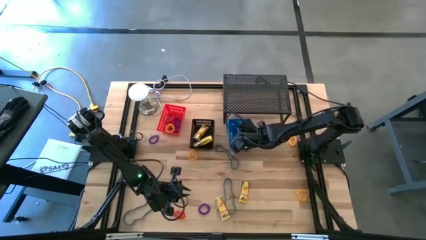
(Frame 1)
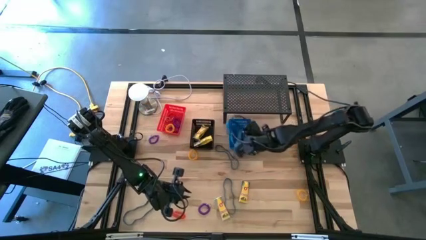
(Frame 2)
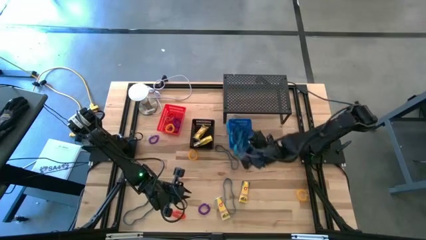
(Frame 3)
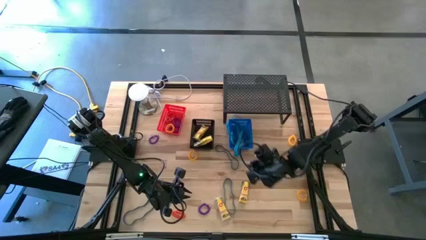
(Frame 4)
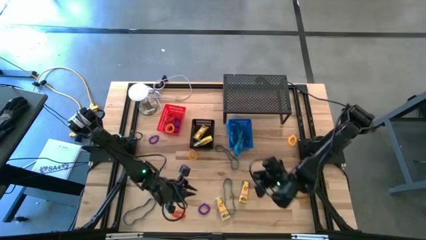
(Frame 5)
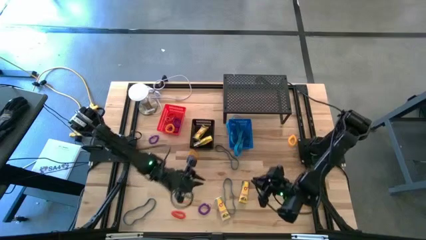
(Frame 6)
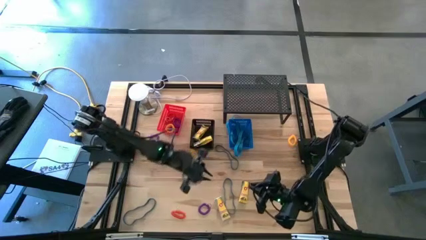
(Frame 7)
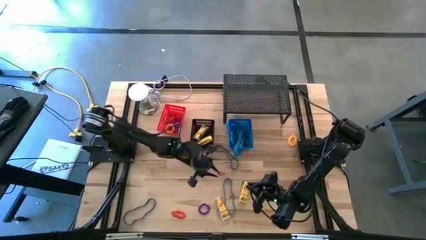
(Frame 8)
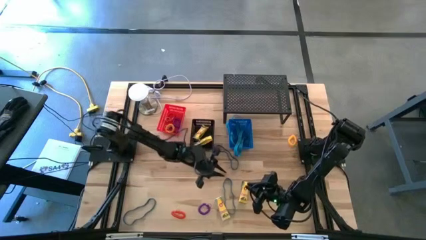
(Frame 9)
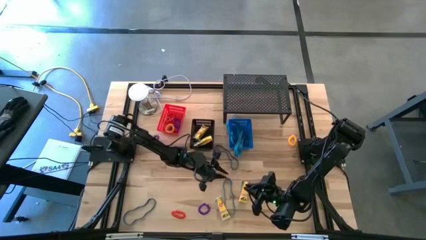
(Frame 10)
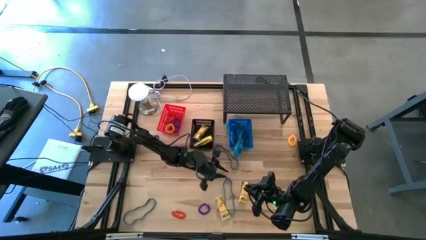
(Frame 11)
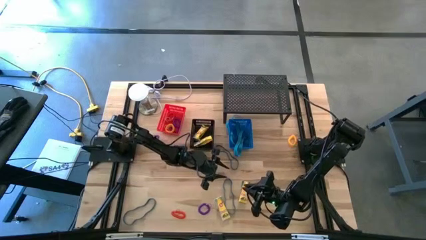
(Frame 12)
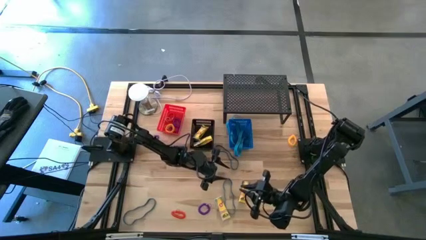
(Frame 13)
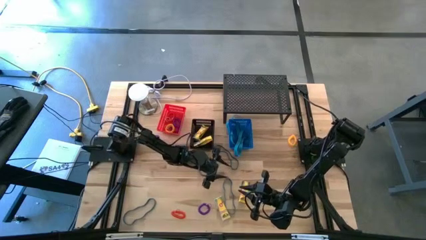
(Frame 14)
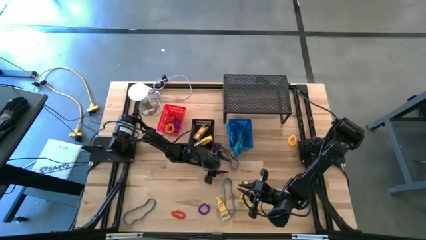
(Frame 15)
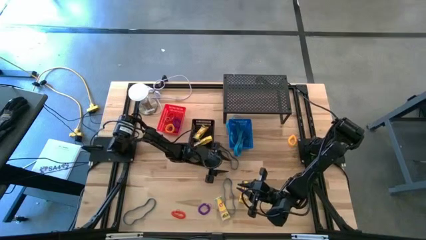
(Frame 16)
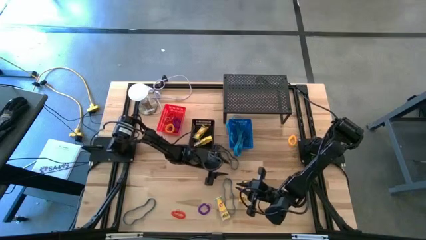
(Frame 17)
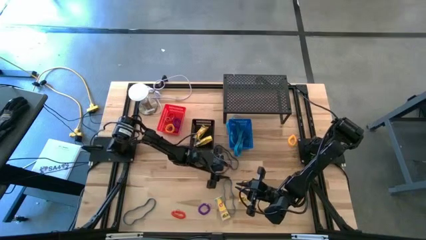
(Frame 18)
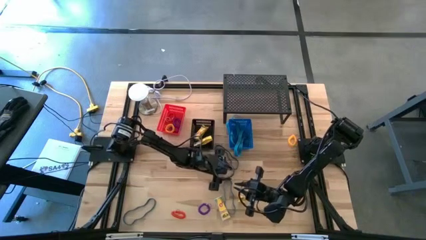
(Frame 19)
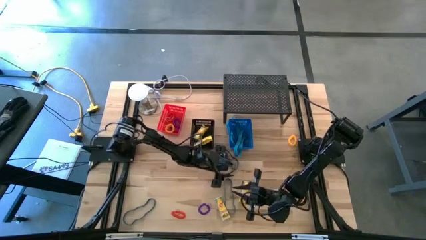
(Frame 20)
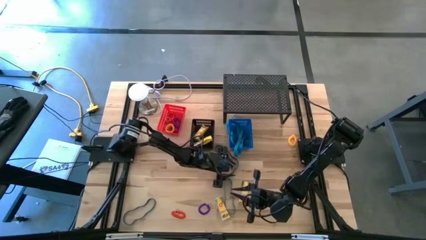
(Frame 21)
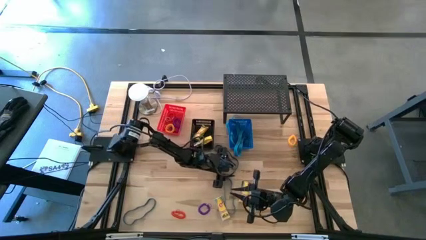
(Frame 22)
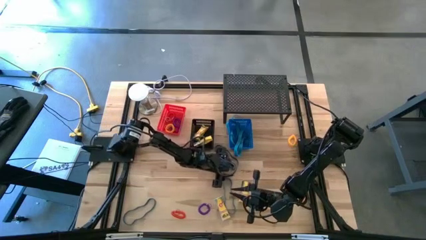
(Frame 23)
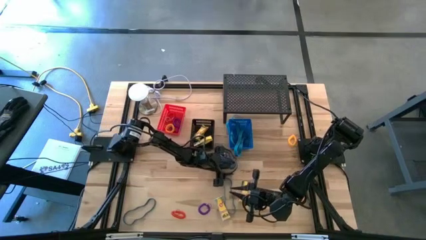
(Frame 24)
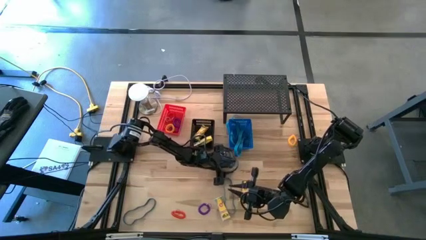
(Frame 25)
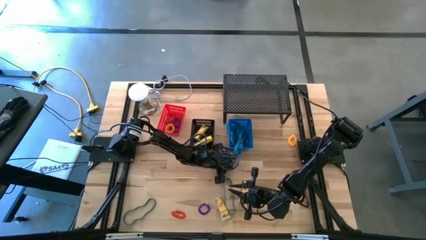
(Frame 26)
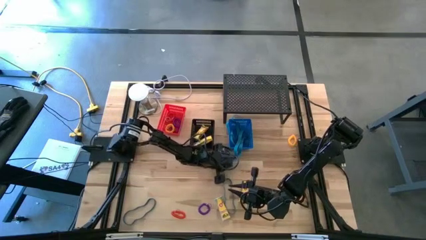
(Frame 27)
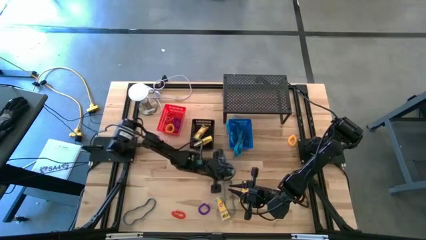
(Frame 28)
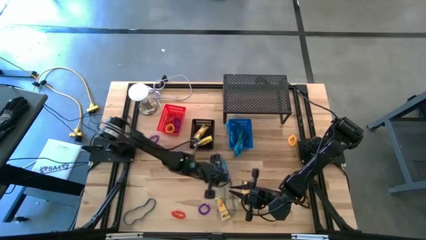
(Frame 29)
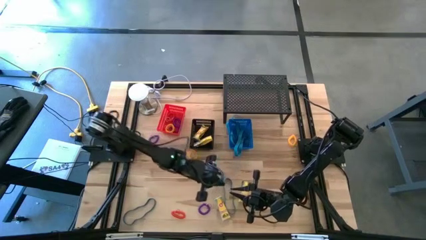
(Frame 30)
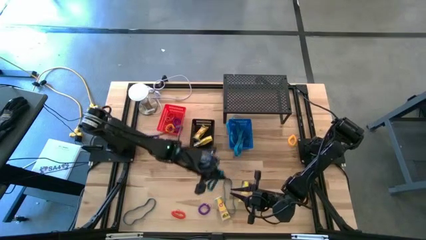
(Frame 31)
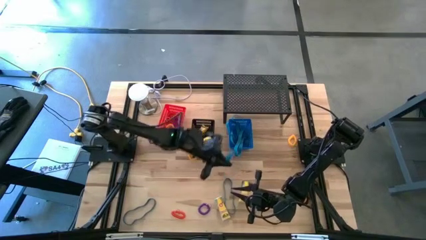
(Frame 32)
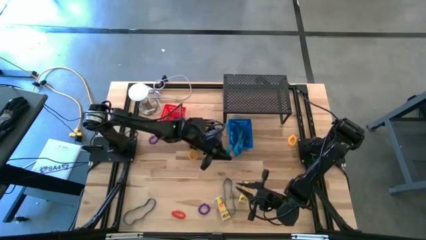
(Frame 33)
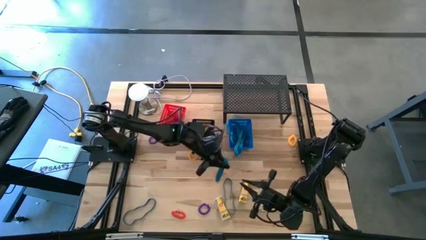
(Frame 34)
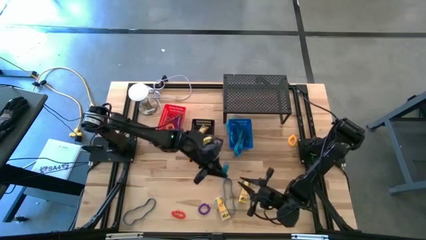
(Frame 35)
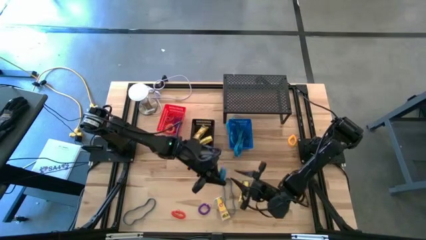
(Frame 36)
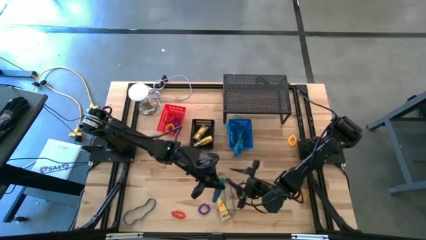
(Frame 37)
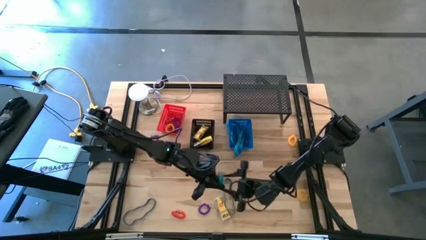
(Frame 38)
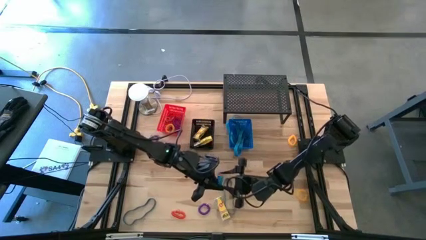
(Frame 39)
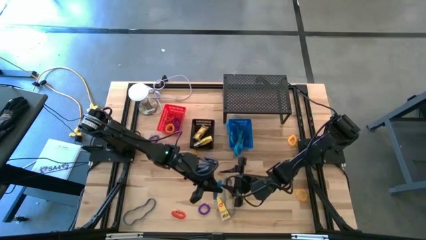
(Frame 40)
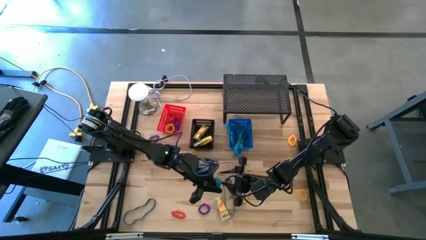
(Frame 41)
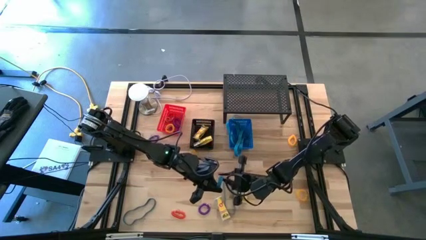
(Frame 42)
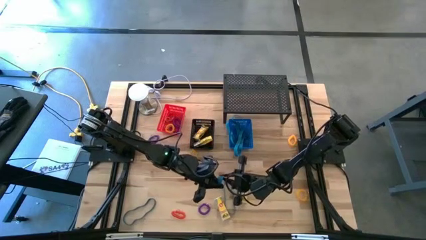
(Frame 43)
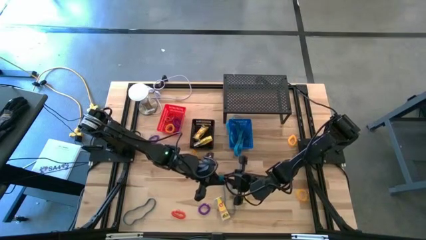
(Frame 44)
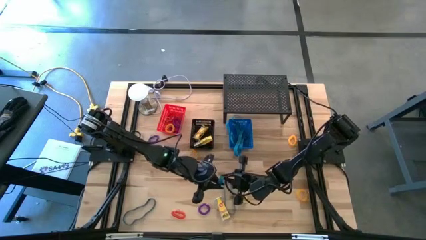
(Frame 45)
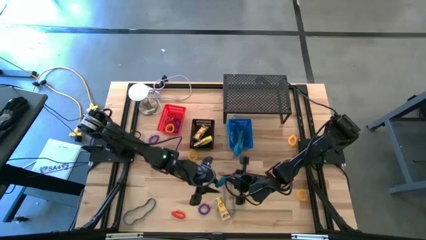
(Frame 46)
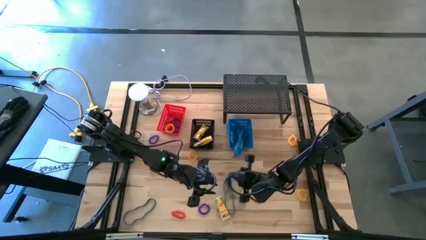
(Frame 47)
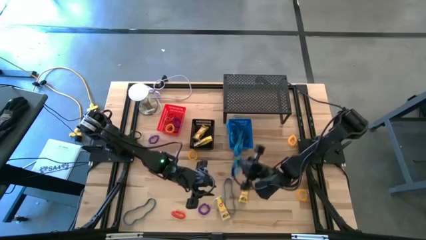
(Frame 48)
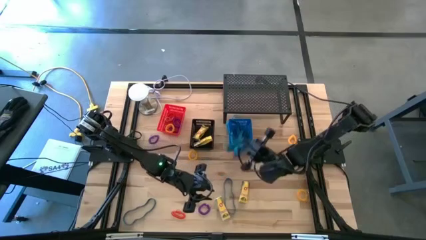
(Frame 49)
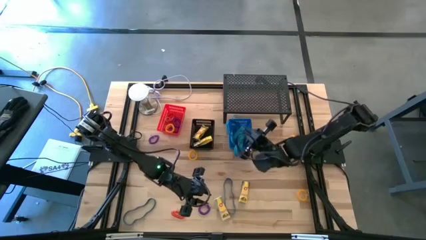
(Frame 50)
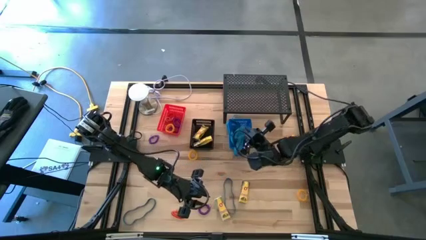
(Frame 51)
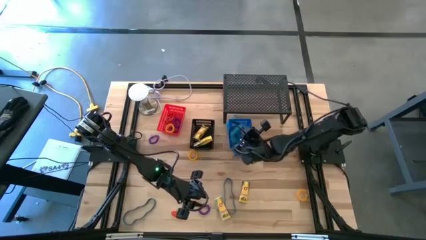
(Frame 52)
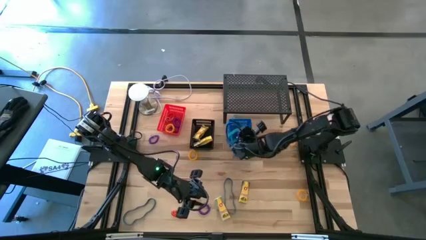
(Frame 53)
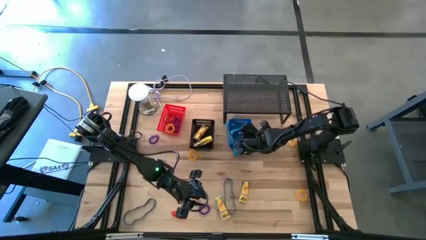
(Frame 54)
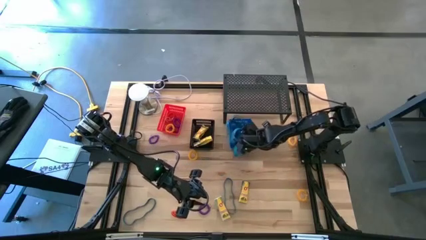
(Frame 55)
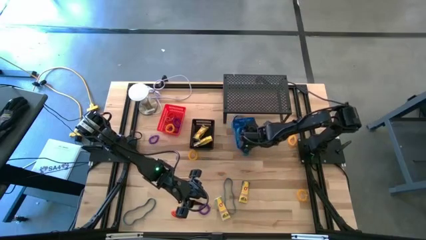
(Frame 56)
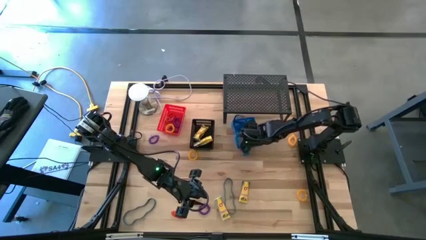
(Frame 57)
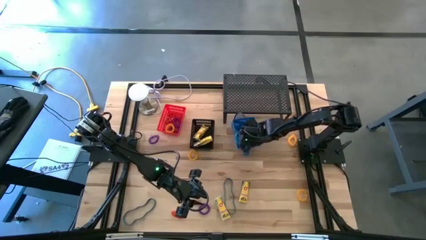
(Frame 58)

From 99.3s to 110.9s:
Task: Pick & Place Office Desk Supplies
Put the blue rubber band into the blue bin

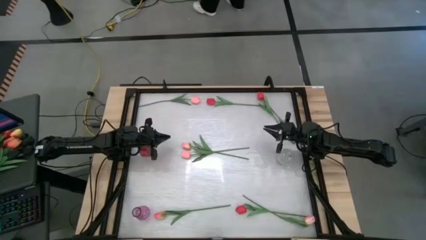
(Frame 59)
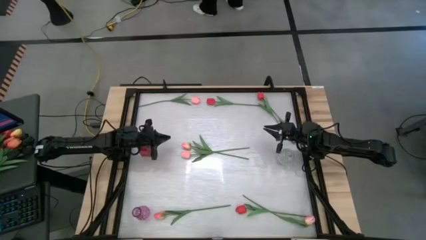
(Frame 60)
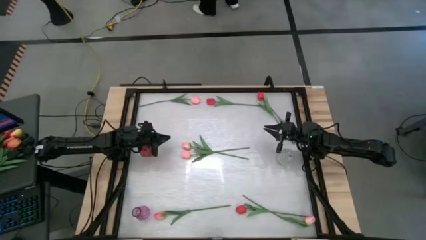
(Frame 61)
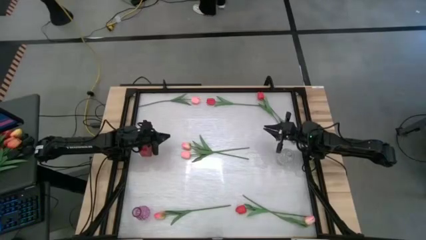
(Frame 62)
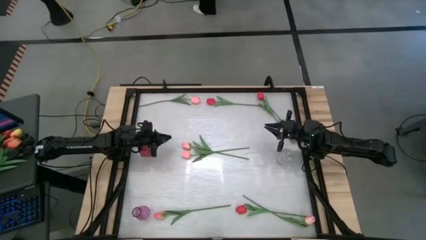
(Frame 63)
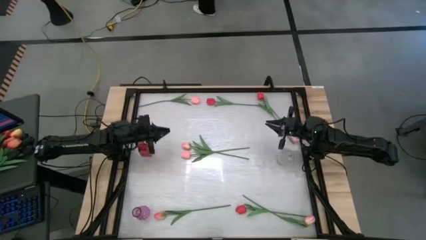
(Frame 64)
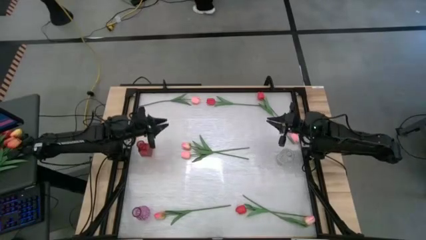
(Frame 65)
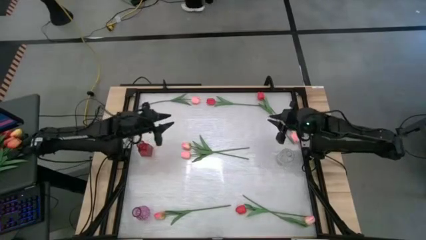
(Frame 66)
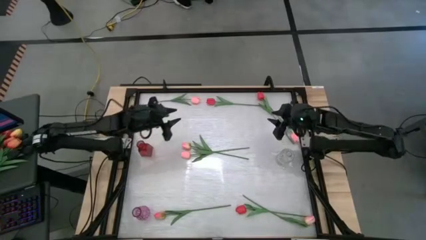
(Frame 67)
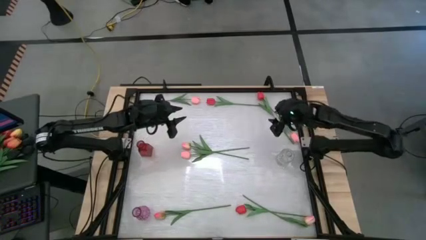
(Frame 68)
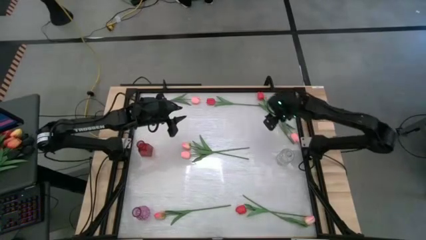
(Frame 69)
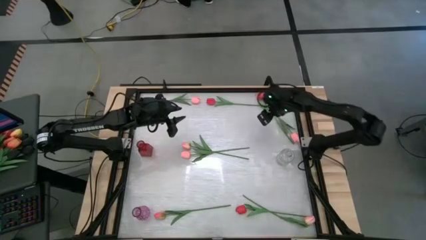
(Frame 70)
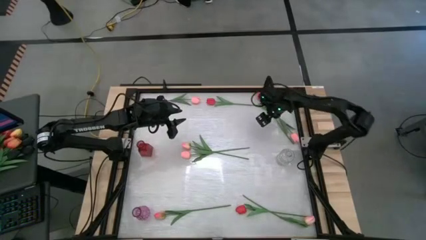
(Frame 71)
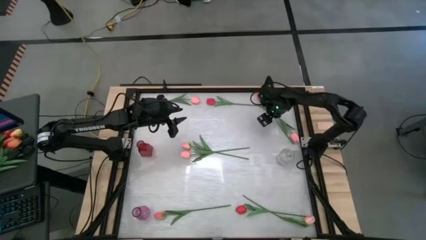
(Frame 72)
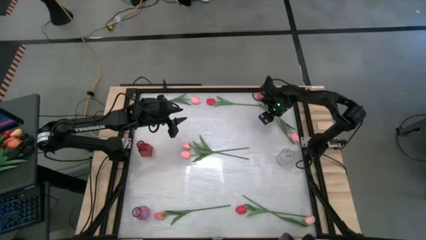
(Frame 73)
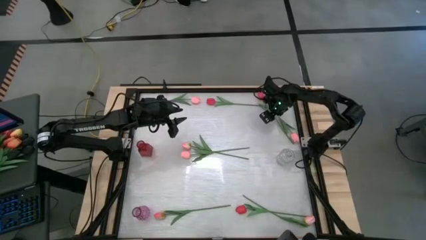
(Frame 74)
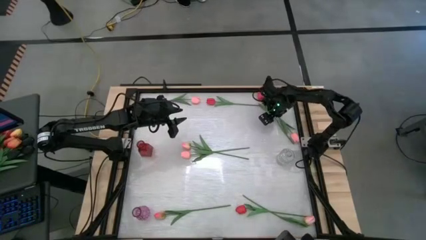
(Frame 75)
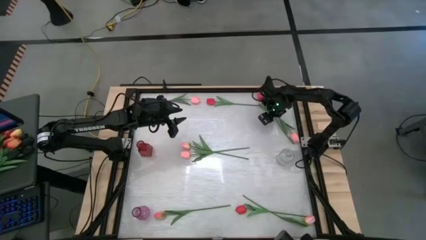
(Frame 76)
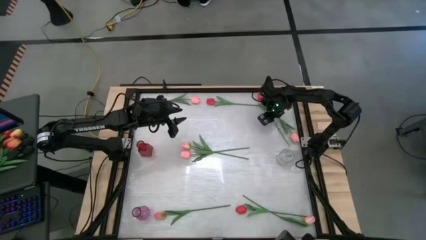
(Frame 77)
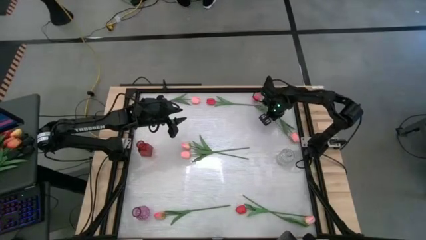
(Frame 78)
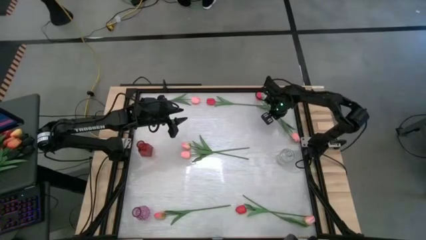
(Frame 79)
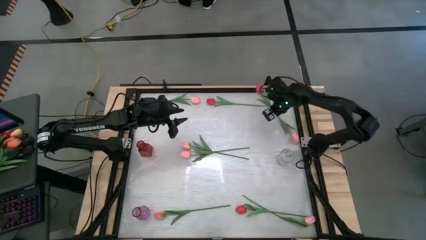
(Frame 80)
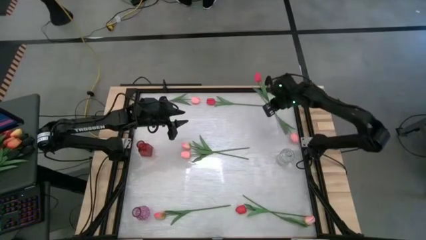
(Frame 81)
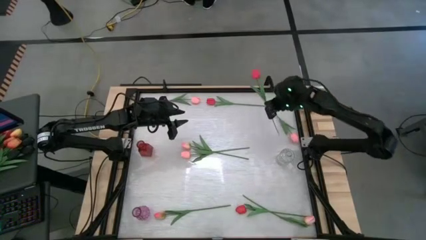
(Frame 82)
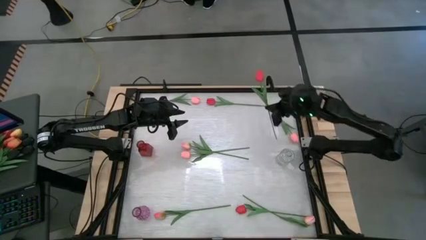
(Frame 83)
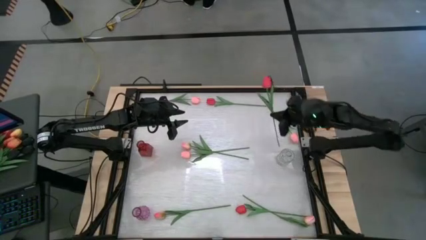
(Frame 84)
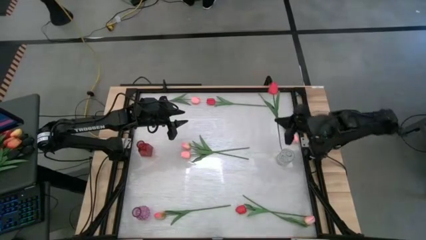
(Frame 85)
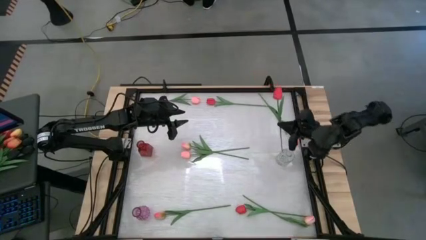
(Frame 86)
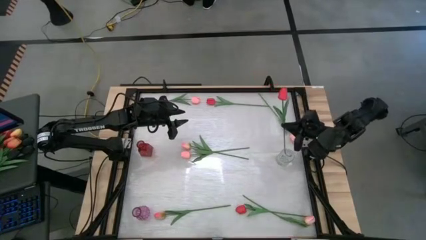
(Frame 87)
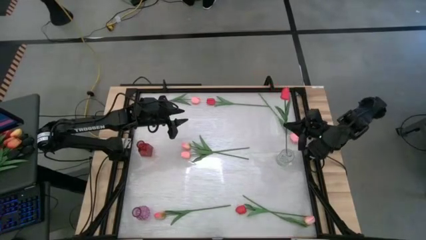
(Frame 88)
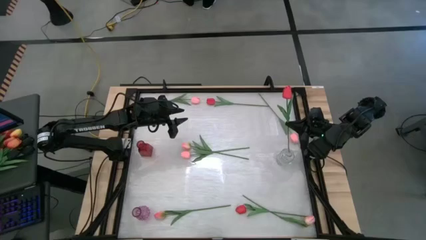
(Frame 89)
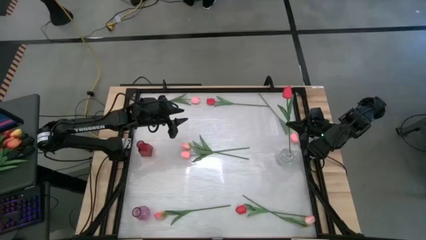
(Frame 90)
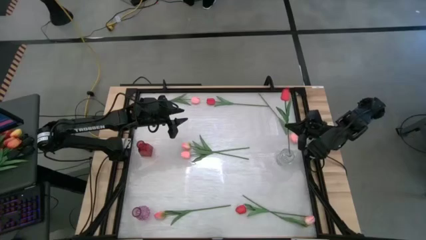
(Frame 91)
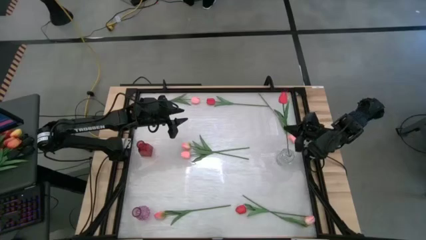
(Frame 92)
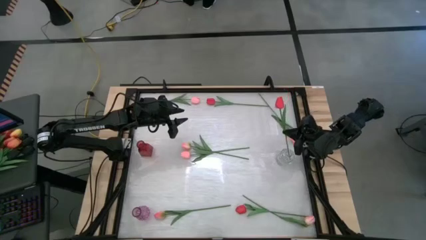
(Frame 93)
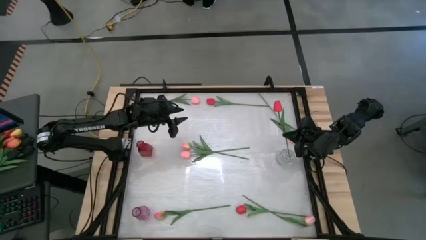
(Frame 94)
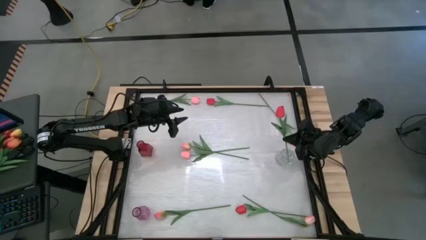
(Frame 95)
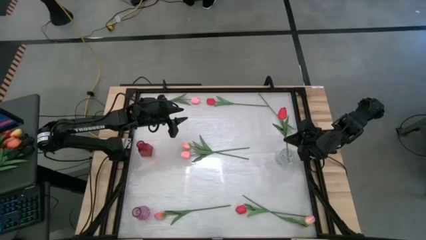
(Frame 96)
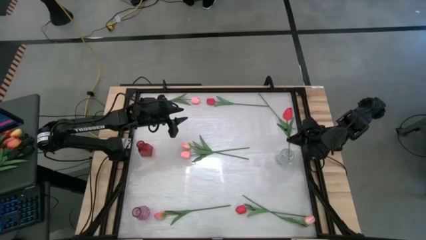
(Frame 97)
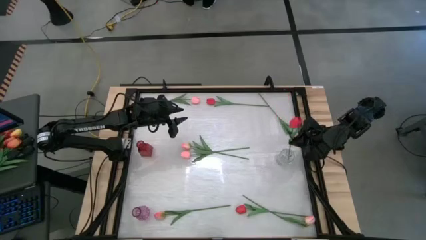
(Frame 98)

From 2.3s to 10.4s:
Task: Sort flowers into vase by color
Put the top right red flower into the transparent flower vase
